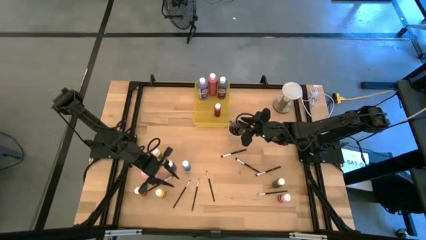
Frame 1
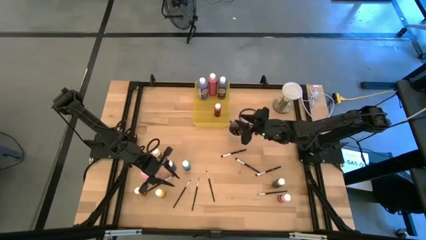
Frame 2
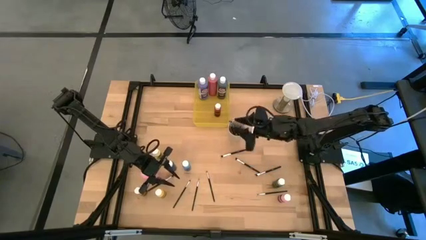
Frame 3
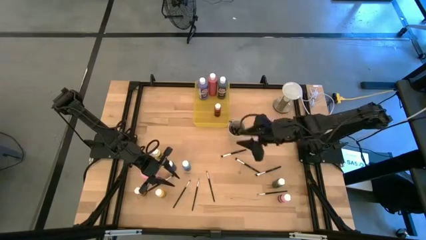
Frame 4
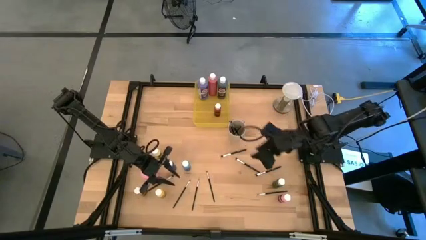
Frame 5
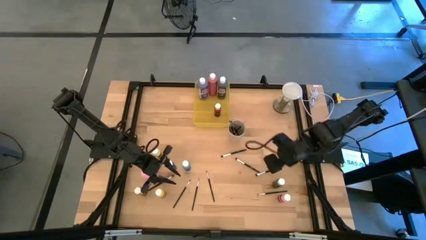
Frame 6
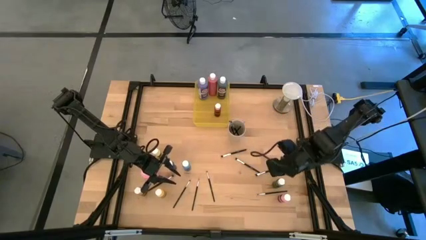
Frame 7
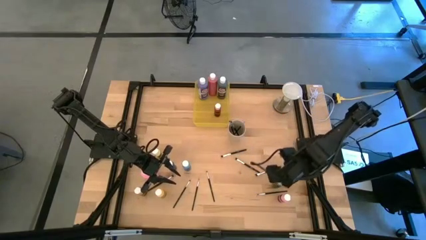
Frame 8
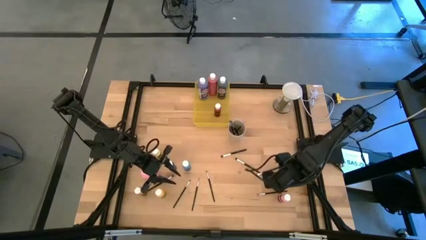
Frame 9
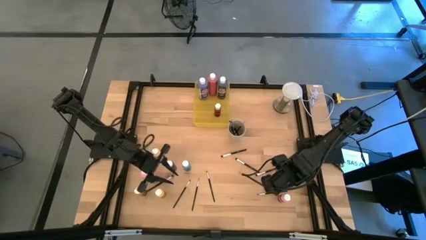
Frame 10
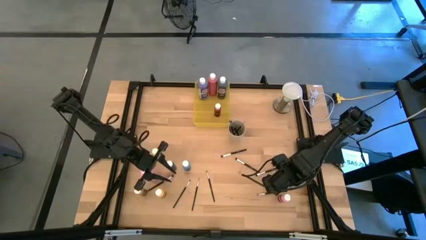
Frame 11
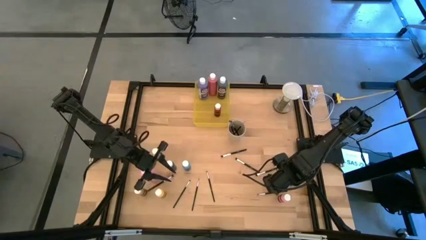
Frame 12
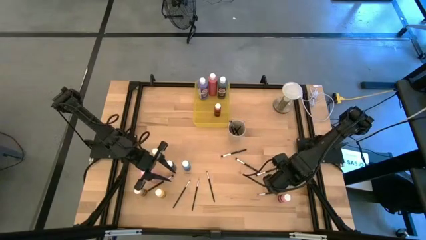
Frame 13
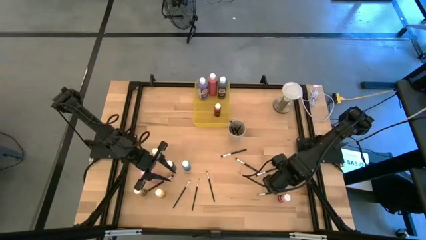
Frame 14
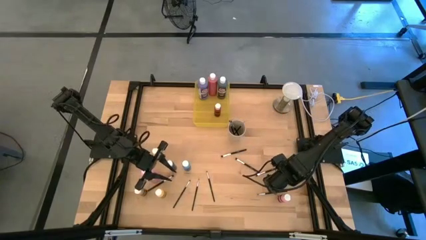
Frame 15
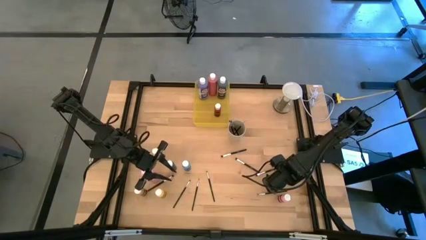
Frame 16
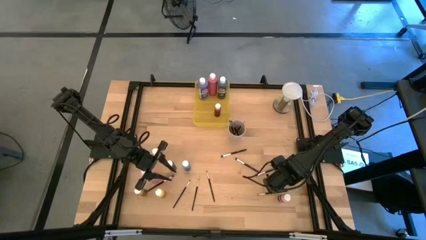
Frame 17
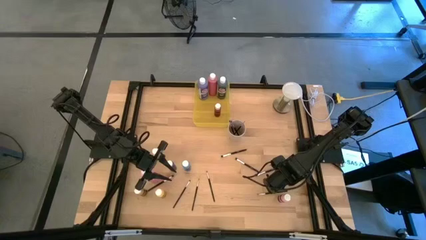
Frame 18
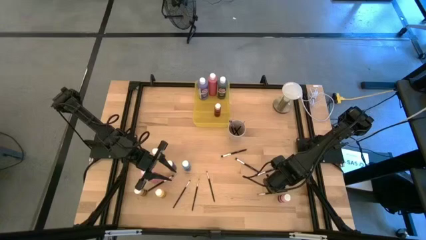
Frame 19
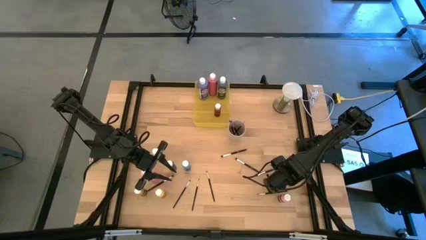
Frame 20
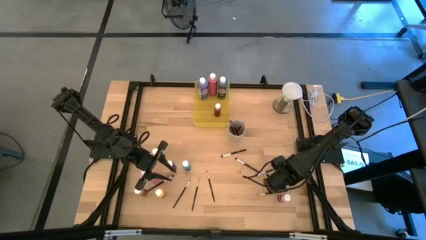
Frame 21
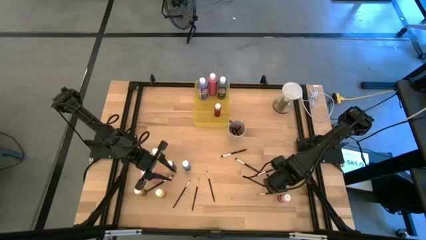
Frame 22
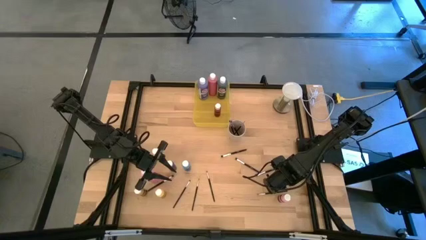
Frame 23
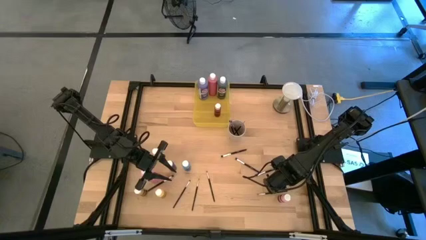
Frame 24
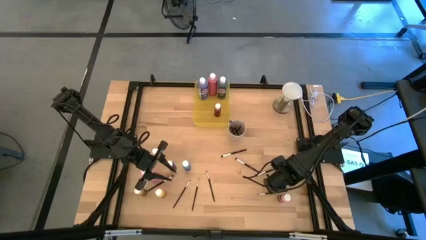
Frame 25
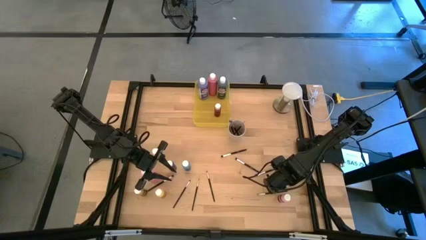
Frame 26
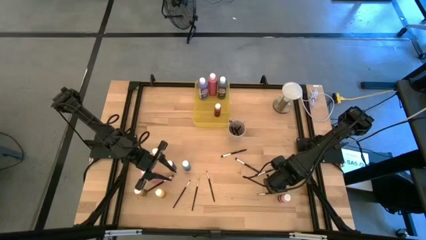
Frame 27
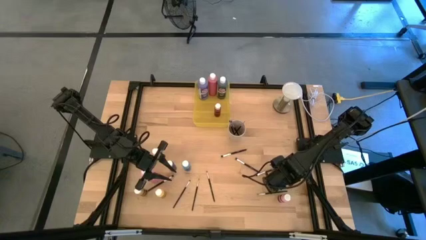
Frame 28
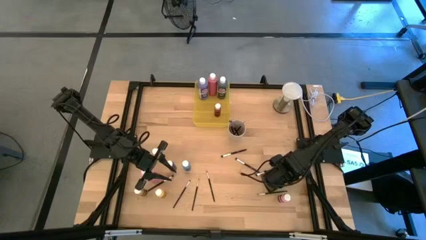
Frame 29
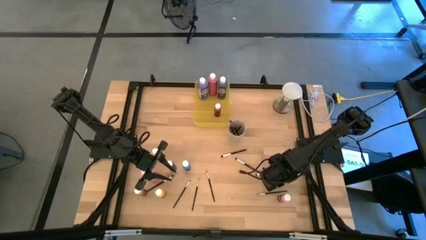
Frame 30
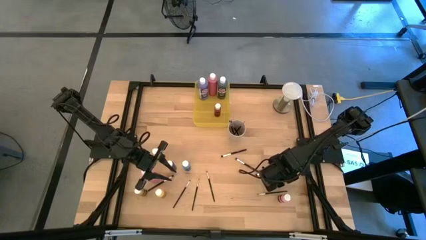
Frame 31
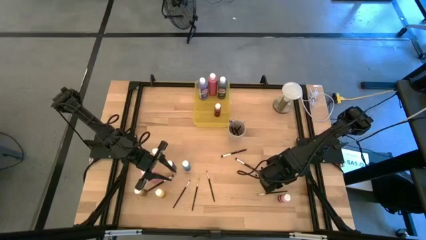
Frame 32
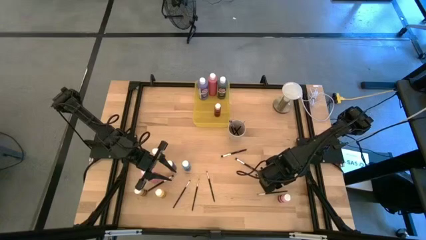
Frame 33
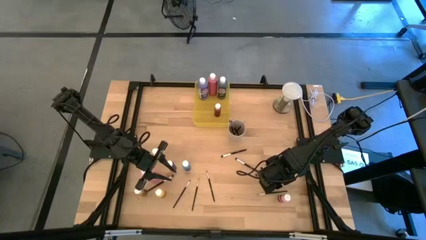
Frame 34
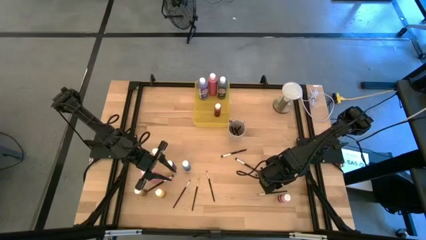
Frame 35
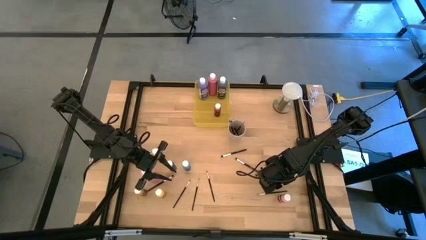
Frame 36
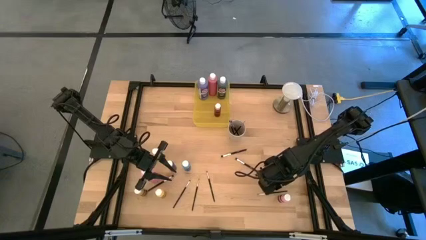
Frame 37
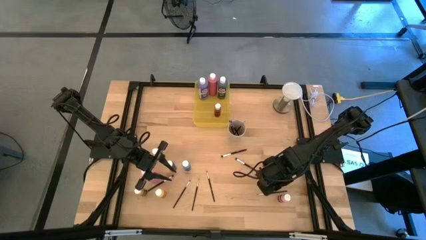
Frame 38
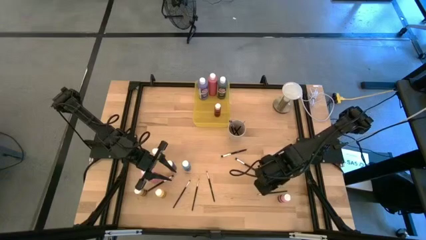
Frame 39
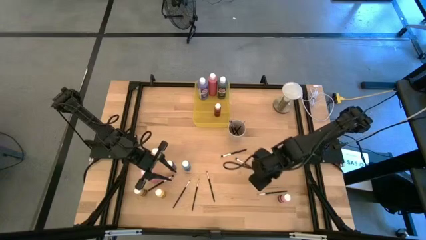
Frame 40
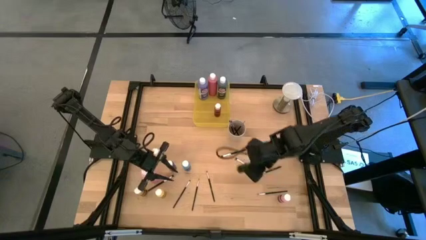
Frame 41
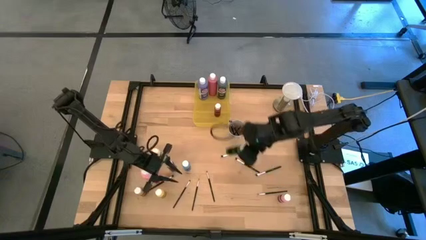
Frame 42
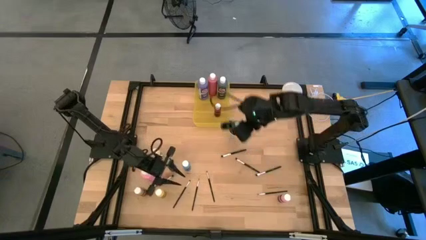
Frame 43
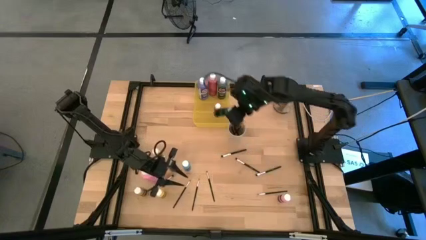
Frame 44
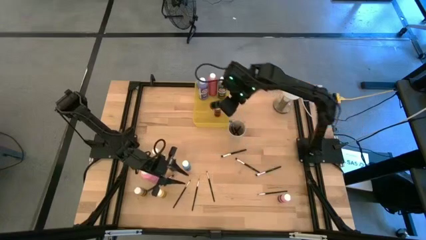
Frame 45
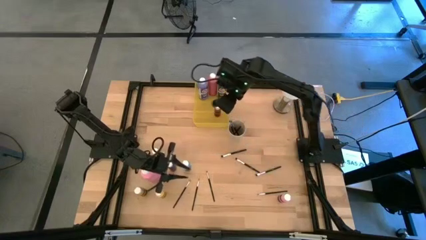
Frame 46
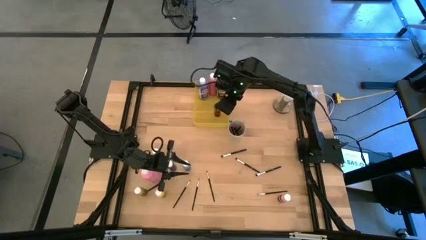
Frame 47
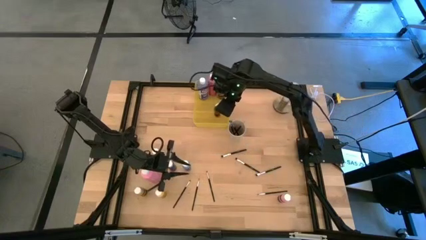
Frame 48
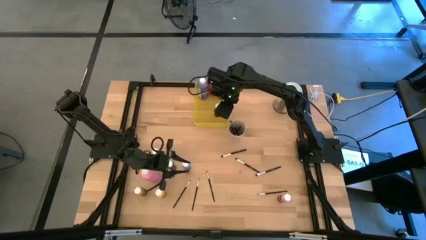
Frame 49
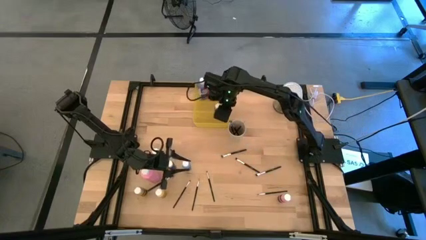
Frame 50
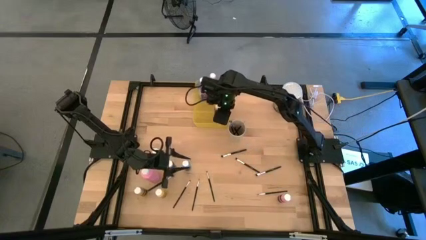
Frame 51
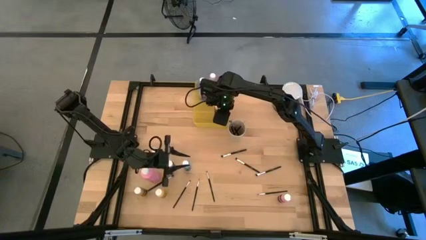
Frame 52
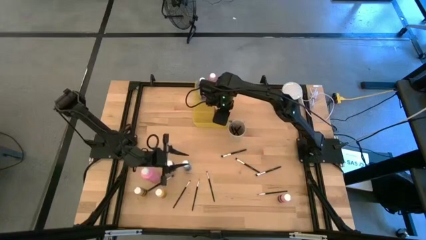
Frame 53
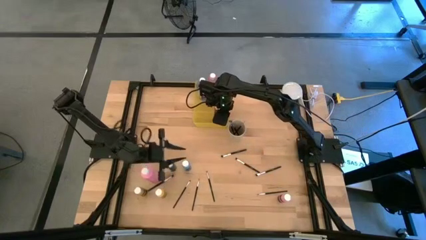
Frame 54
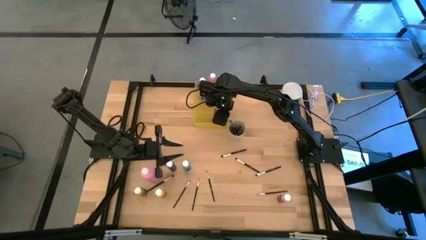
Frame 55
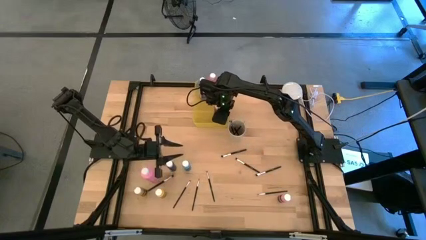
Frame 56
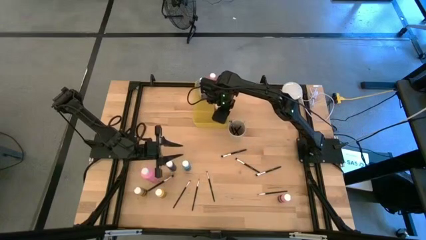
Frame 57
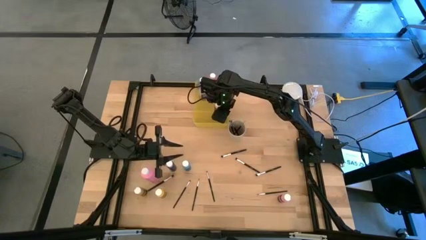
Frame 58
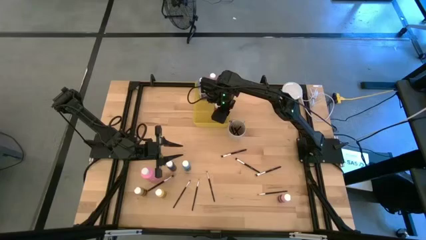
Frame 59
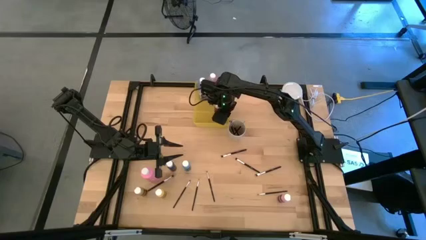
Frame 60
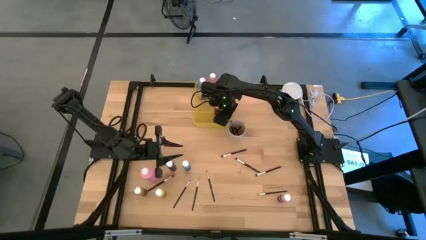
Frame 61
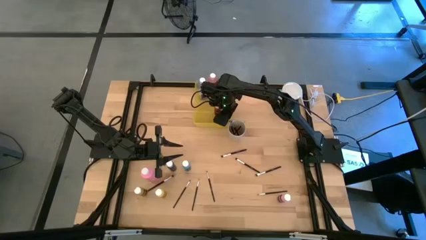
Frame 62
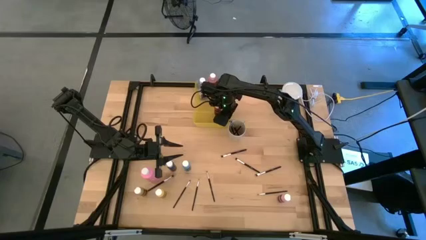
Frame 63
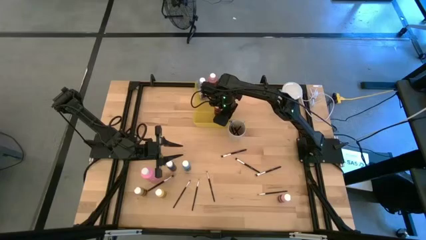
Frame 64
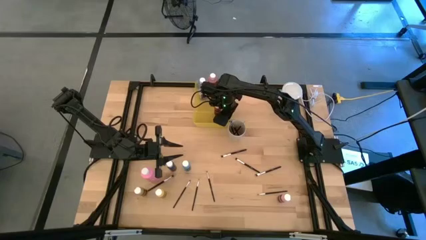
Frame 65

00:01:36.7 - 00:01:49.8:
Task: Pick & Place Paint Supplies
Put the small green paint bottle into the yellow bin

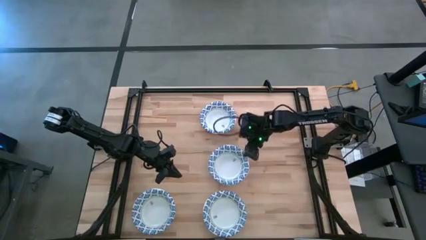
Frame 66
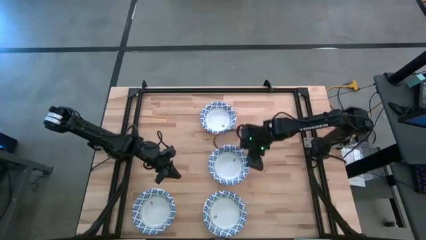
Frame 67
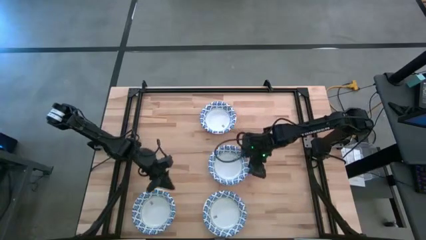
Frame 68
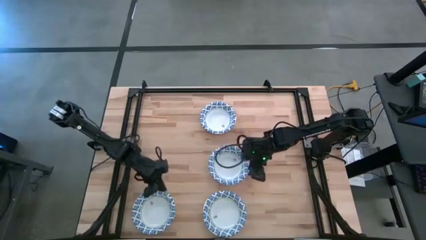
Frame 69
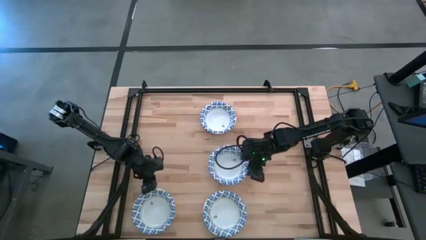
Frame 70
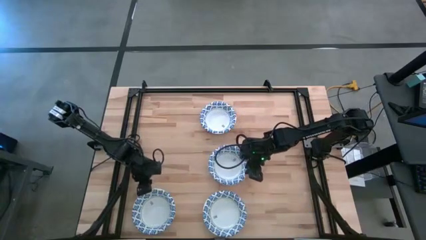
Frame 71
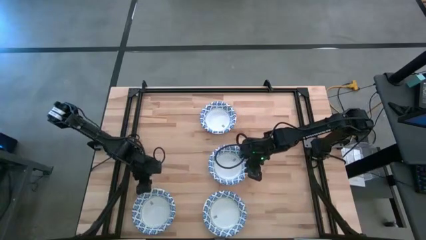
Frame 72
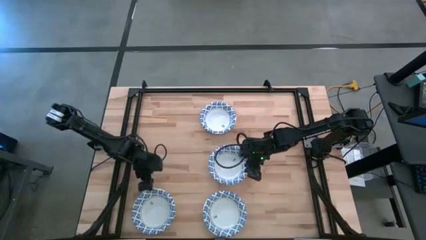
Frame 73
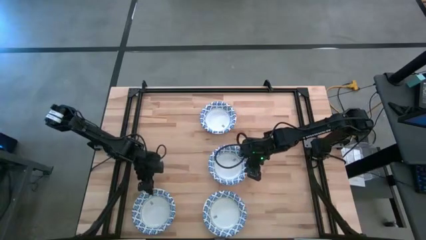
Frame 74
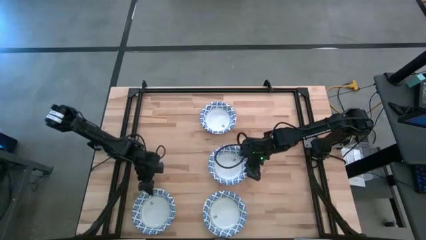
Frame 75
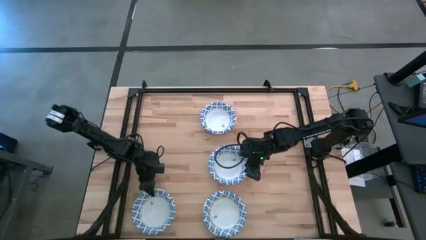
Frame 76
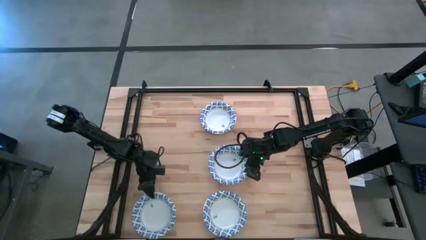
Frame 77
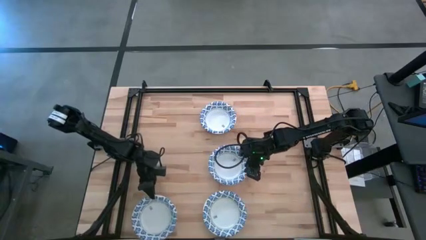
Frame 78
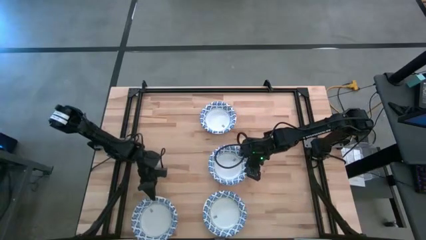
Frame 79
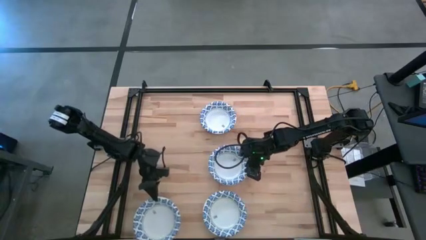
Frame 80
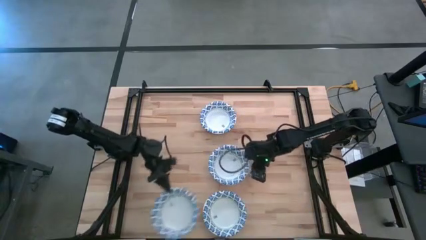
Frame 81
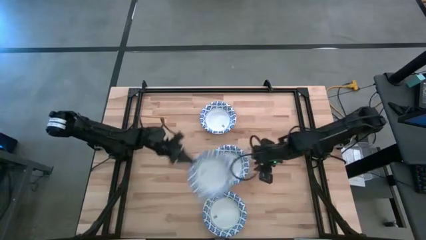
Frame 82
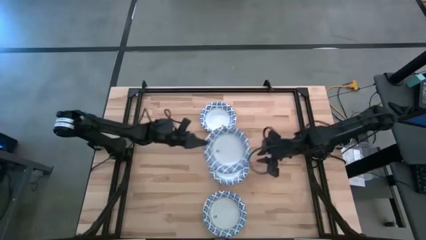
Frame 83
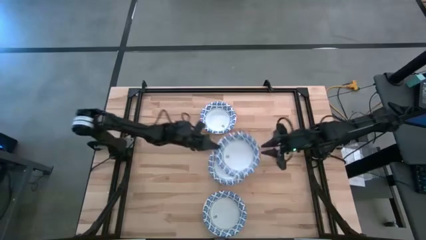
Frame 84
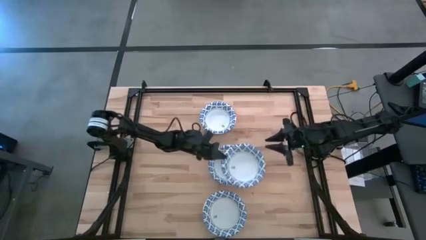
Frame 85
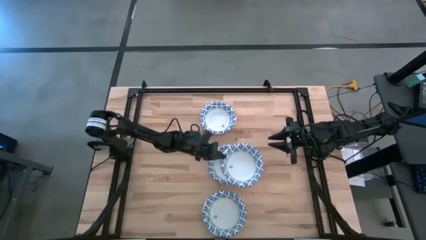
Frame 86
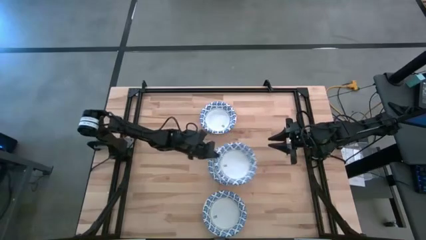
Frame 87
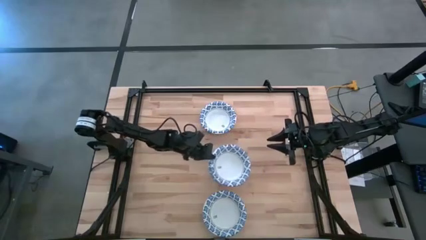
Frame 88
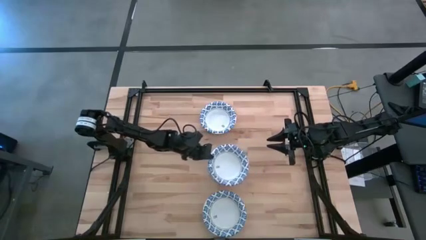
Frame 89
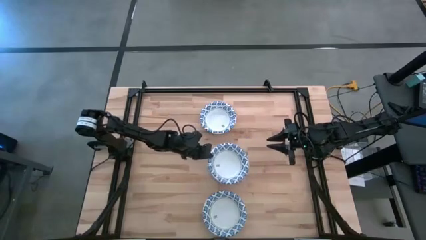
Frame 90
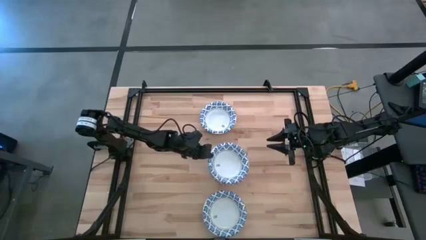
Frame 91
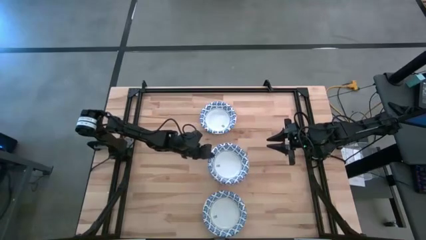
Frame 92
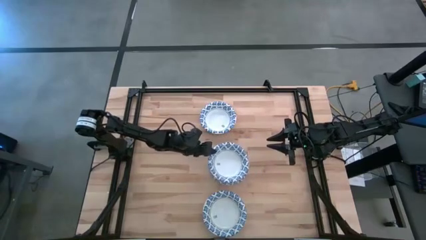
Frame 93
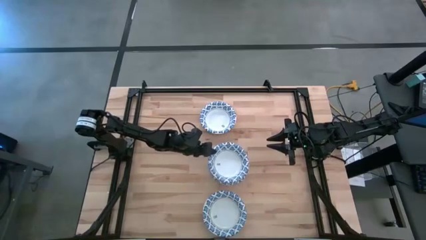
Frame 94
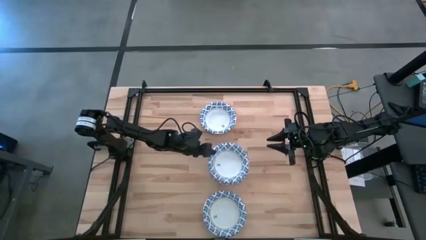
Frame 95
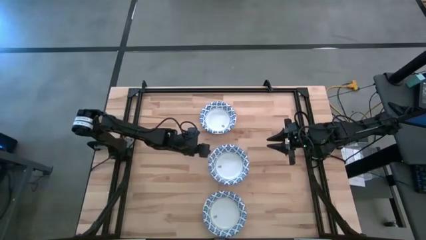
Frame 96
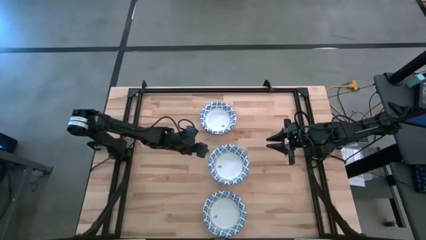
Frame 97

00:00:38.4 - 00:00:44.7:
Task: Nest bowls inside each other
Stack the white patterned bowl on top of the other white patterned bowl
